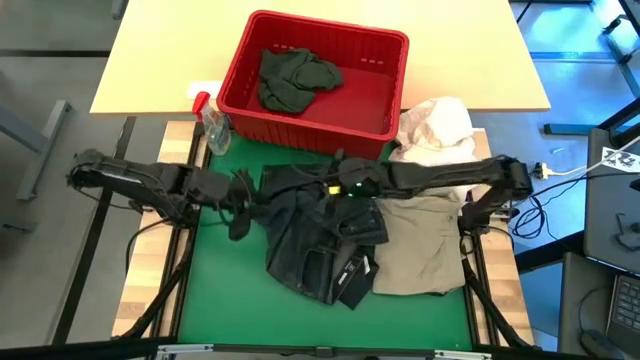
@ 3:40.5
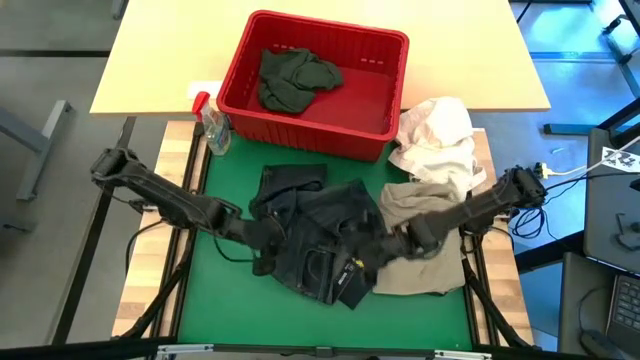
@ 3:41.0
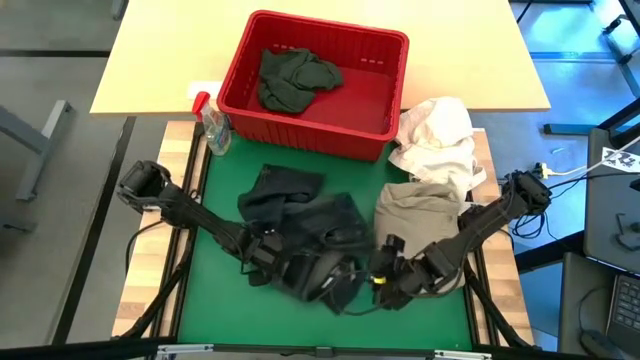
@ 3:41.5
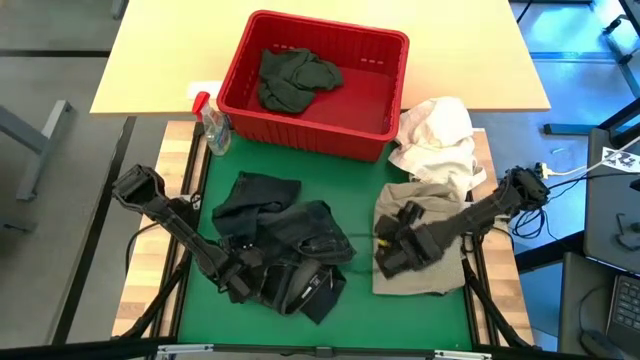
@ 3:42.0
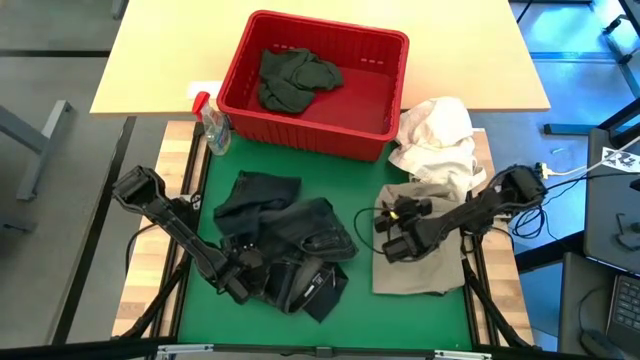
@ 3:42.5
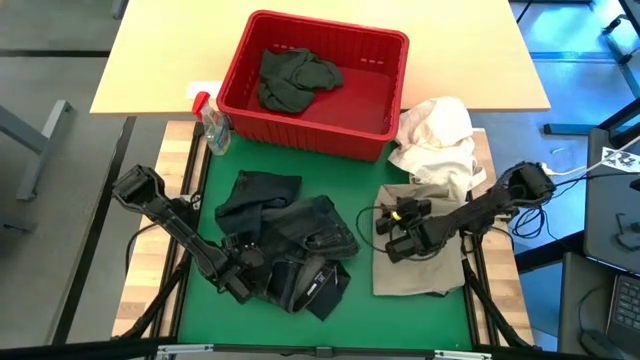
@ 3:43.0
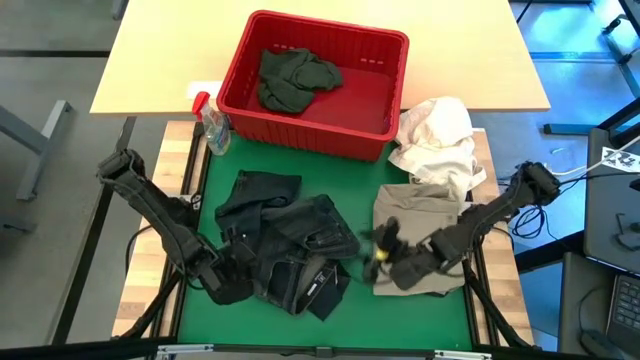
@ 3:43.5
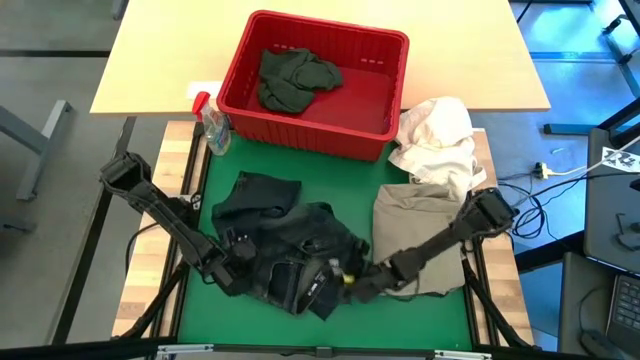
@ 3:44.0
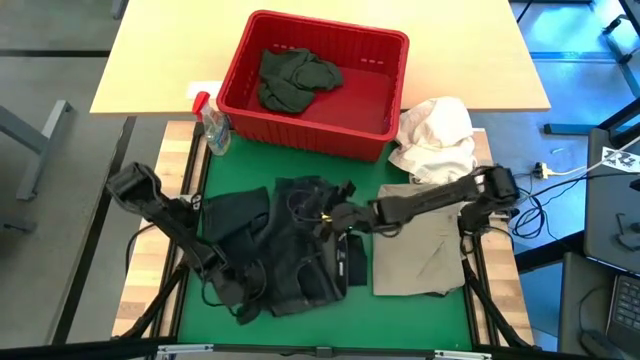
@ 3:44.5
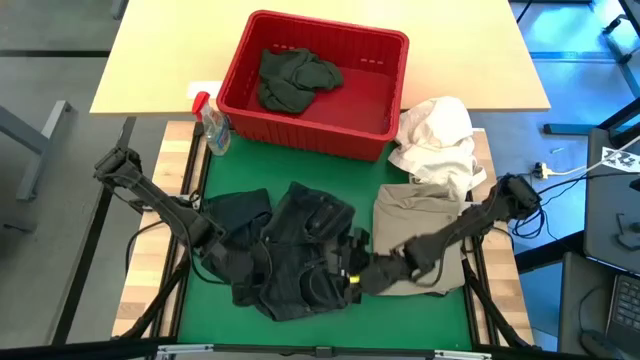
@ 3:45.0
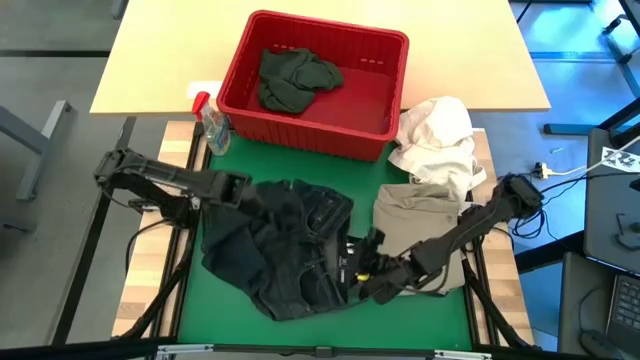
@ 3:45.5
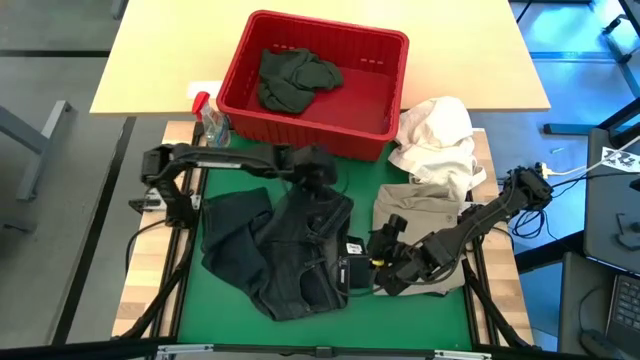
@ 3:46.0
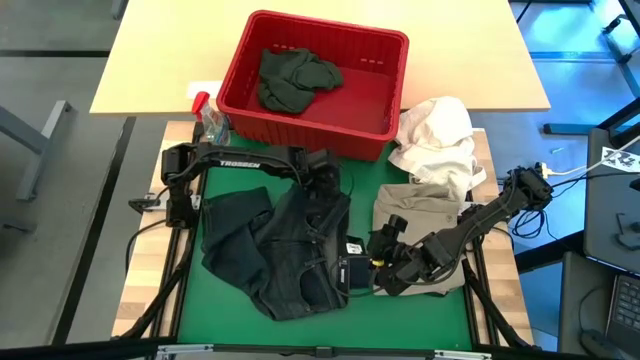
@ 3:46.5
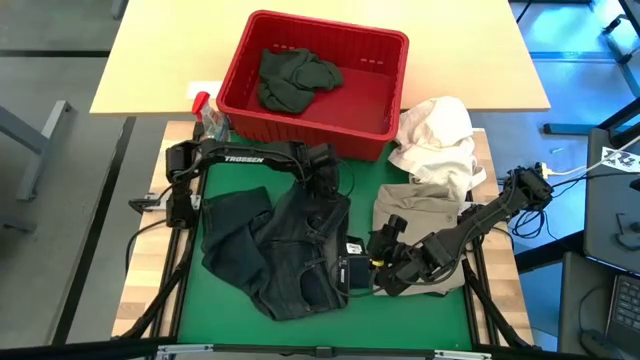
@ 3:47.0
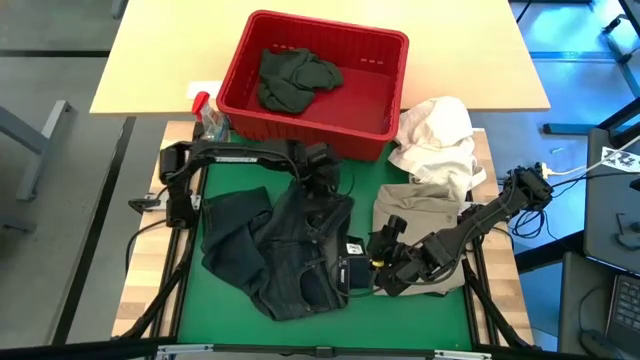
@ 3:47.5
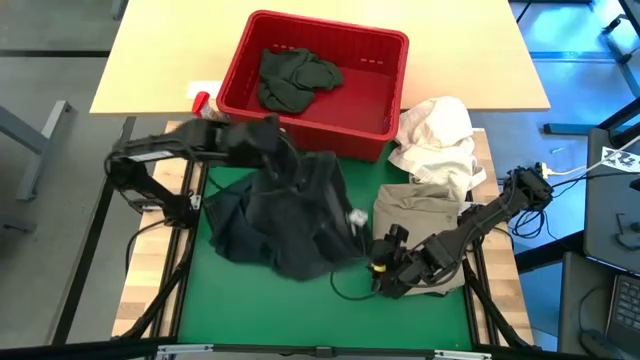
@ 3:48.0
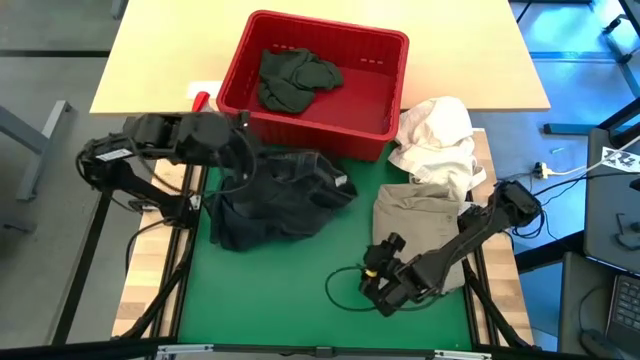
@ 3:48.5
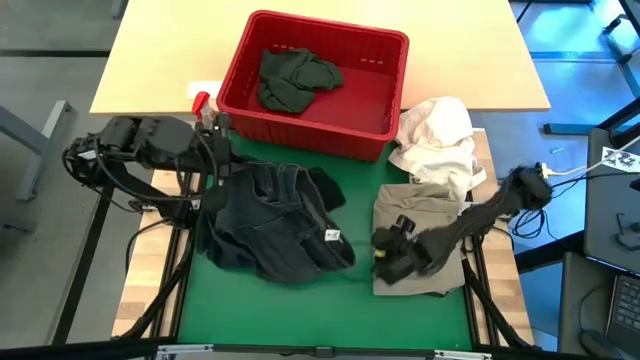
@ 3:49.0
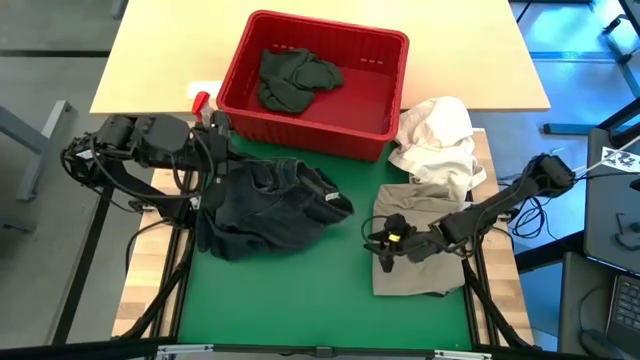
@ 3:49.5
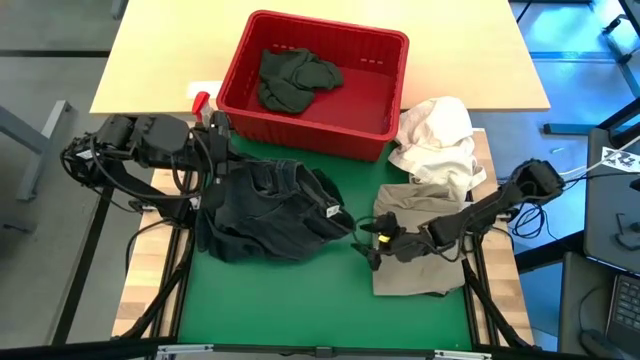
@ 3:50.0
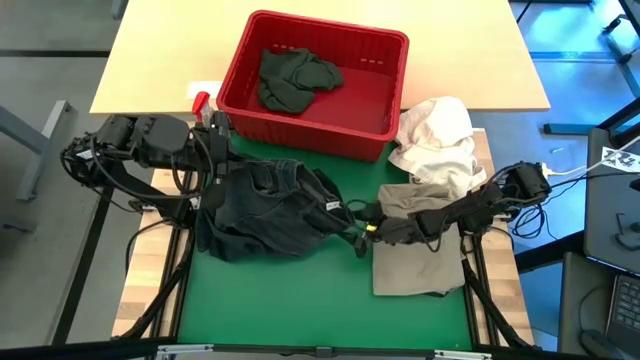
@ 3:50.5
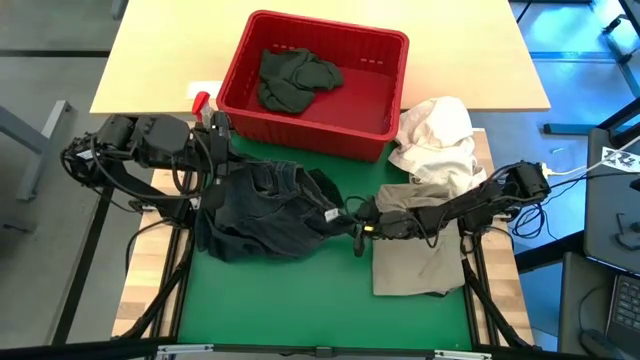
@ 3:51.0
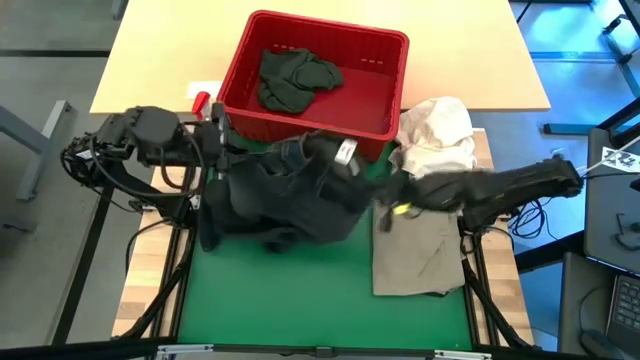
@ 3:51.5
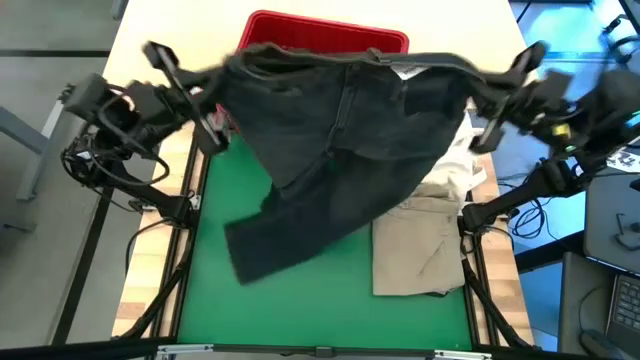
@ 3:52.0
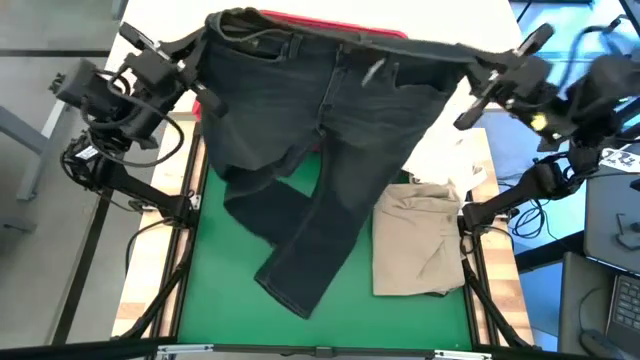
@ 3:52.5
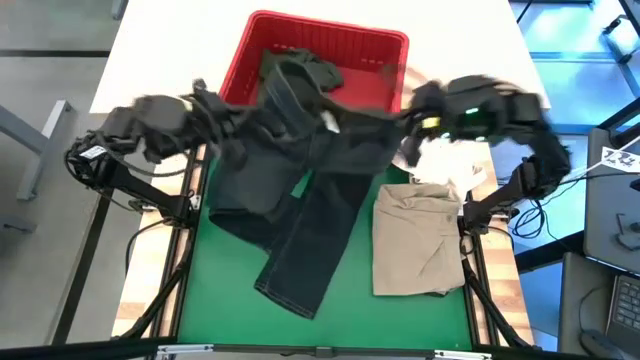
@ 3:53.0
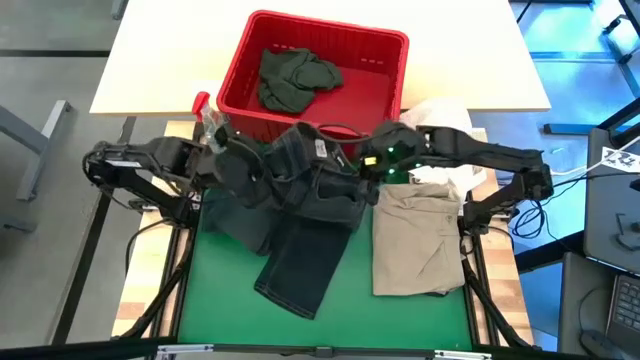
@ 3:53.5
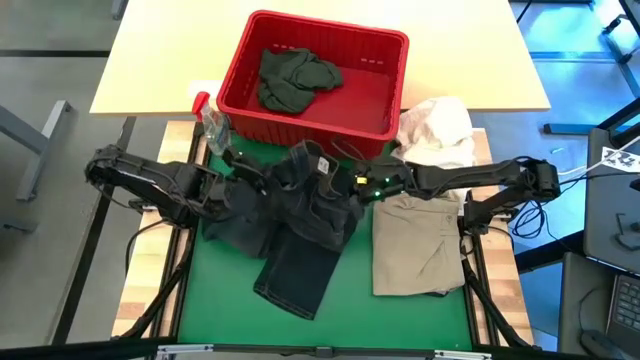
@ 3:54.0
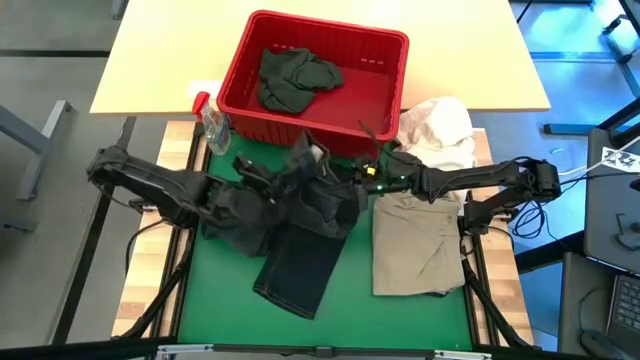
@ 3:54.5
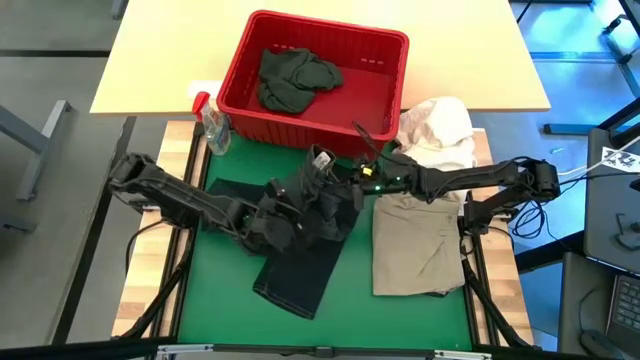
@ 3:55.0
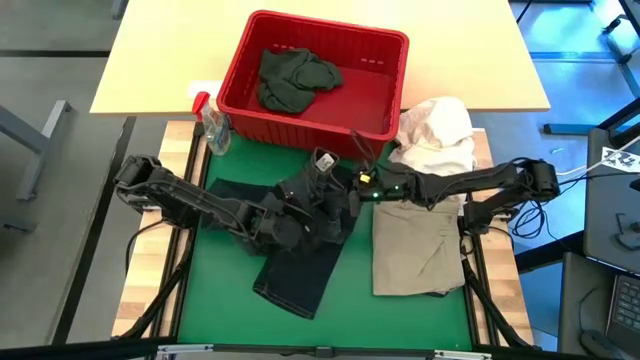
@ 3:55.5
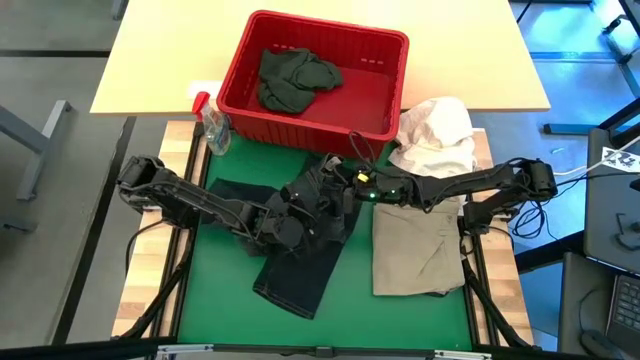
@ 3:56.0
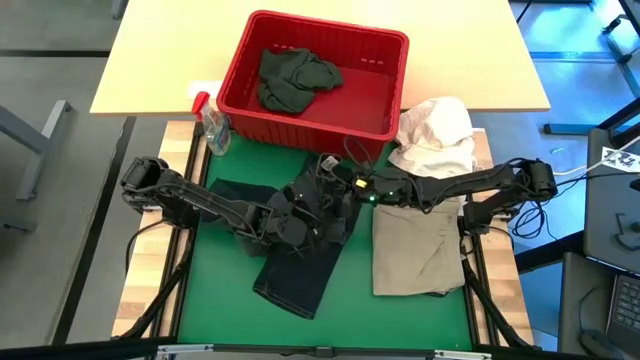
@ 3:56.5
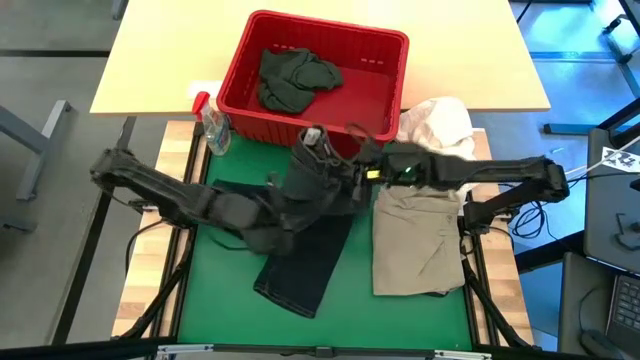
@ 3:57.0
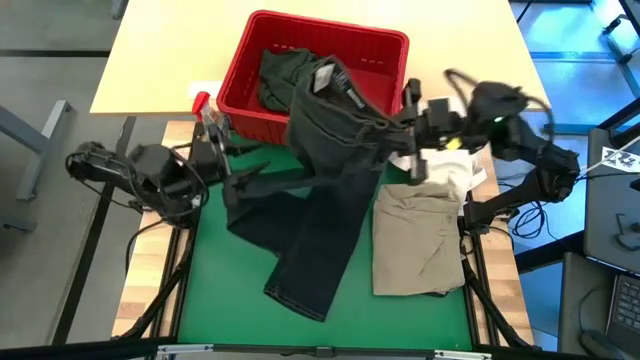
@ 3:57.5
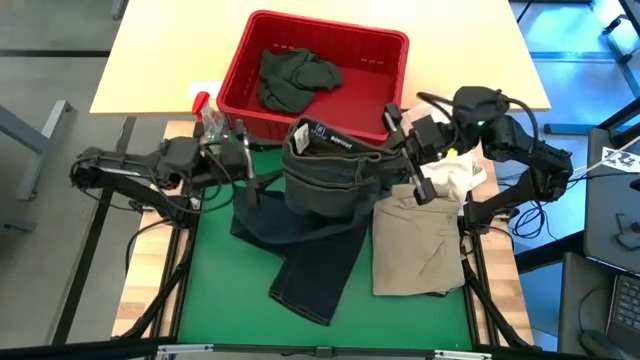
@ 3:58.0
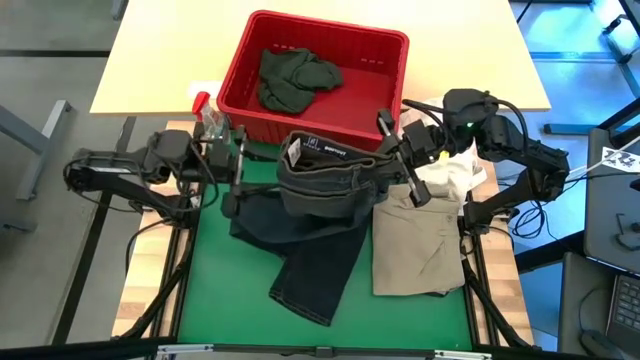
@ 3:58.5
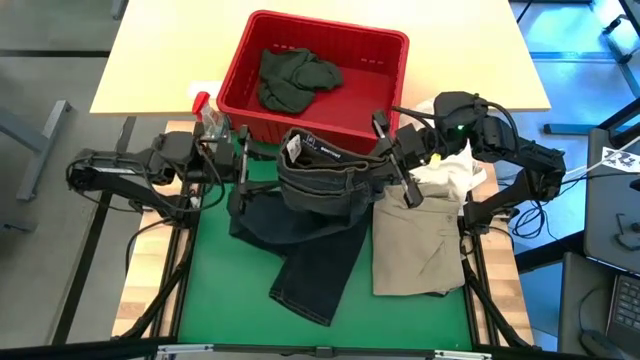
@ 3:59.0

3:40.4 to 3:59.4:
Task: Fold Laundry from Bin
Fold the blue pants

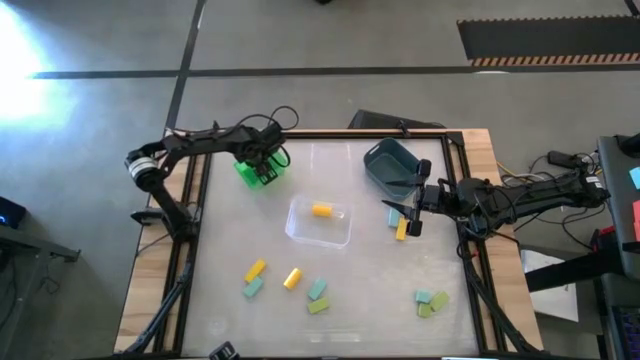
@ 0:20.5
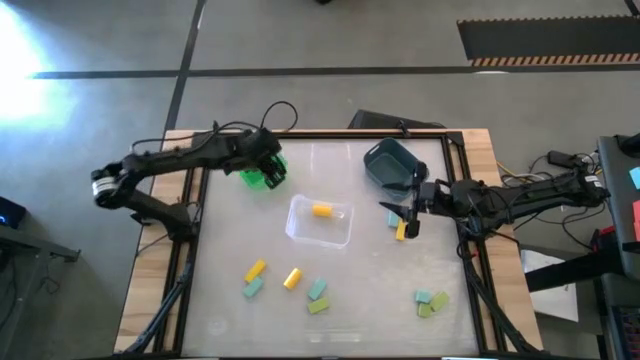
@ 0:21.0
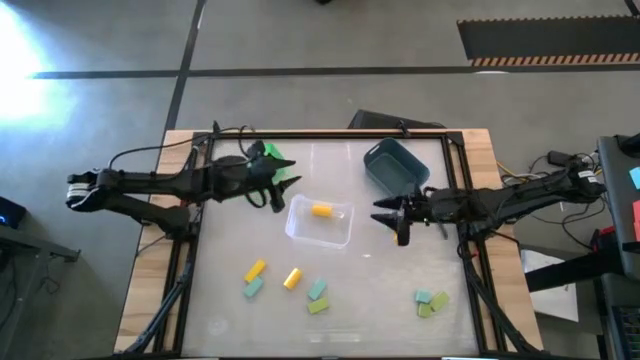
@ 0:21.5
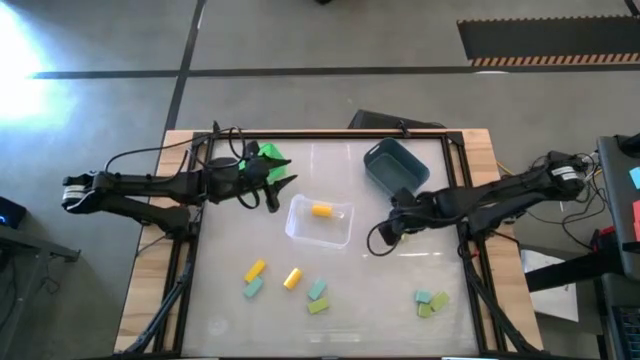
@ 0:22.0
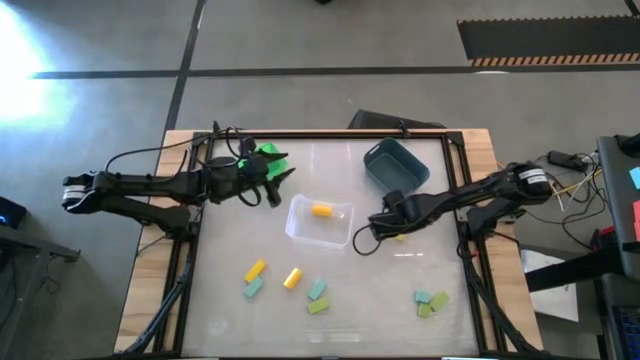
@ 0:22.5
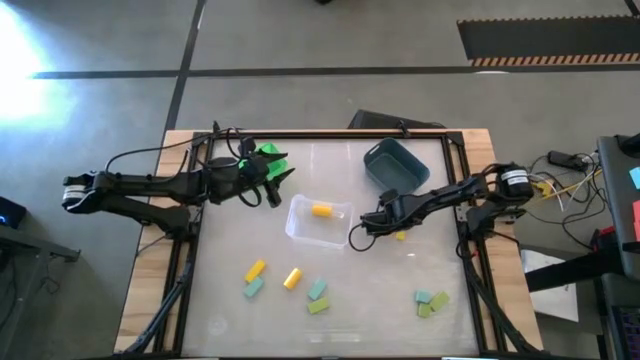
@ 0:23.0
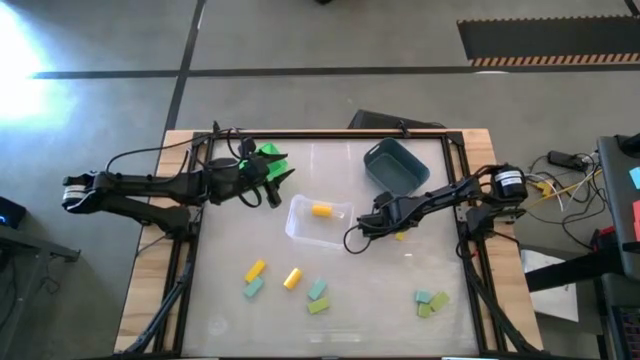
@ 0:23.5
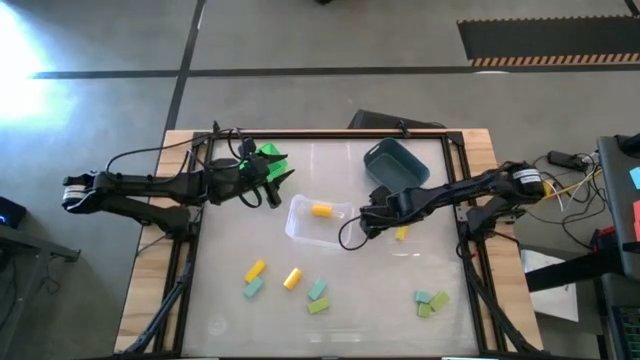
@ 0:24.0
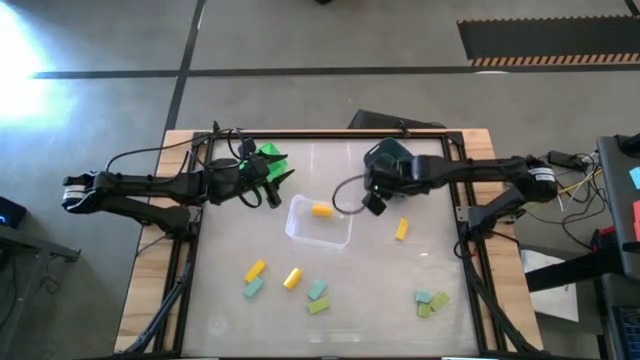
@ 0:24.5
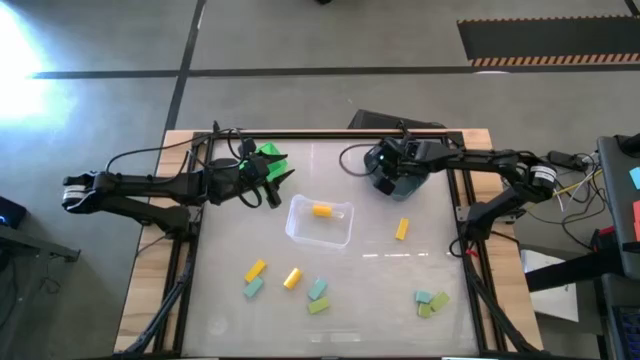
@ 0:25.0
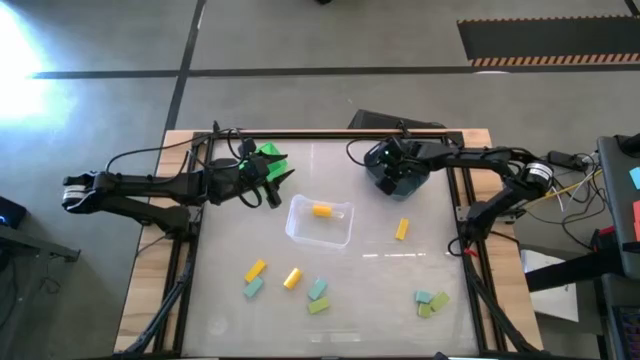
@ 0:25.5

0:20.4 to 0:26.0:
Task: Sort & place blocks by color
Put the blue block into the blue bin
